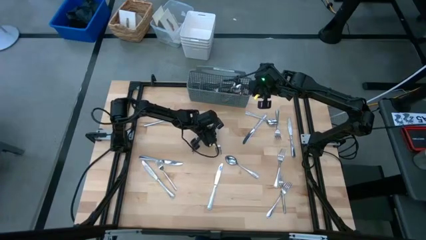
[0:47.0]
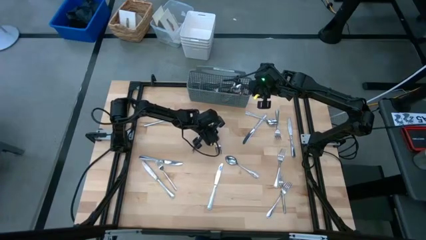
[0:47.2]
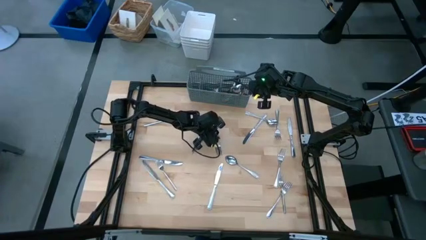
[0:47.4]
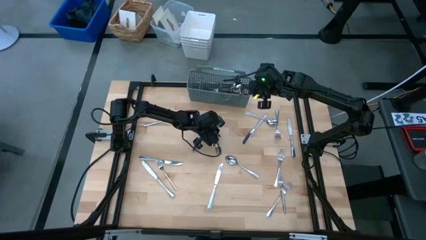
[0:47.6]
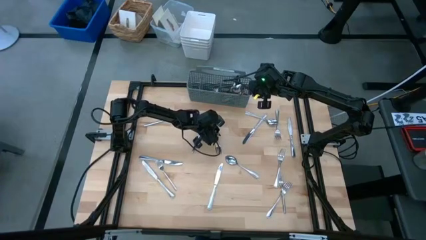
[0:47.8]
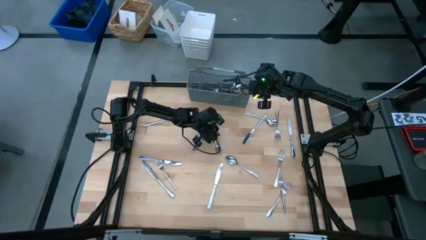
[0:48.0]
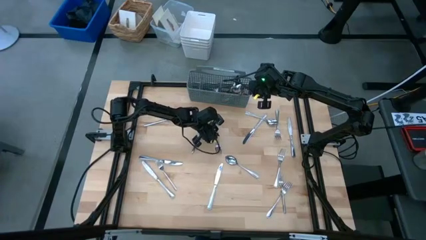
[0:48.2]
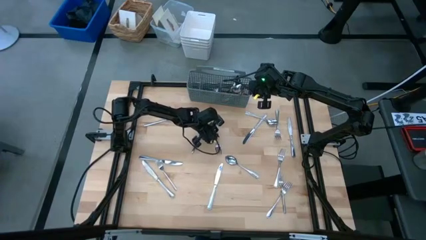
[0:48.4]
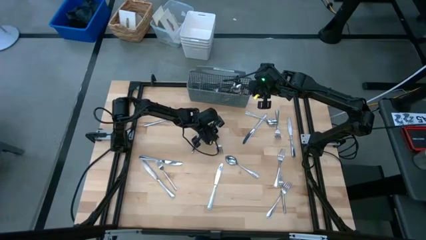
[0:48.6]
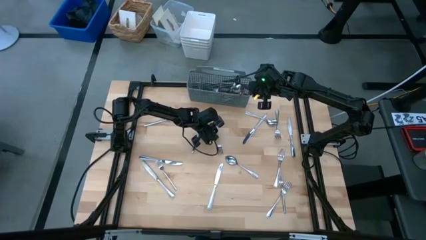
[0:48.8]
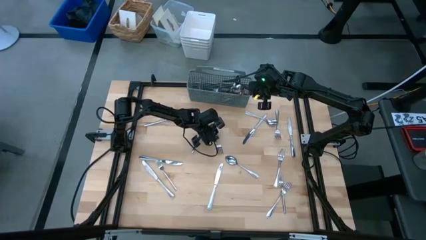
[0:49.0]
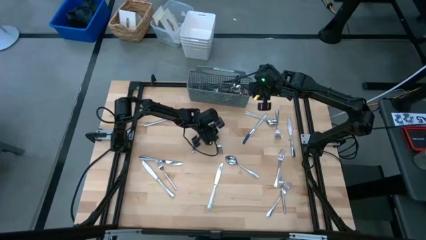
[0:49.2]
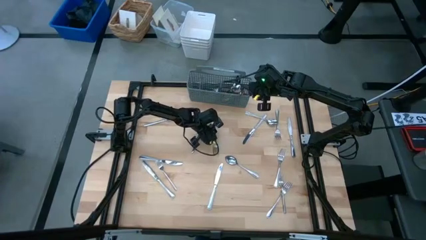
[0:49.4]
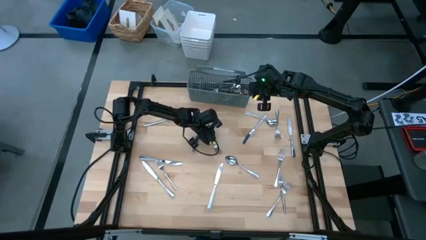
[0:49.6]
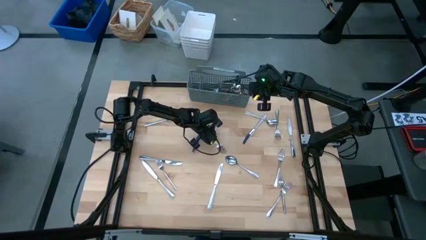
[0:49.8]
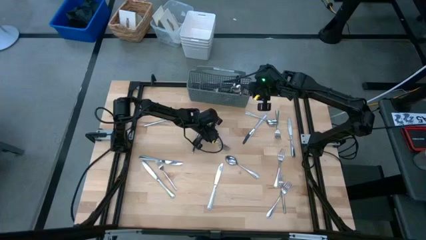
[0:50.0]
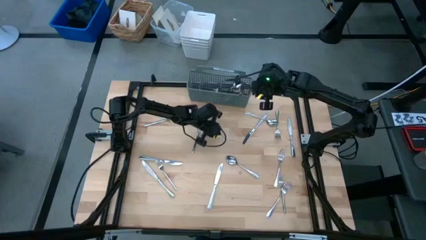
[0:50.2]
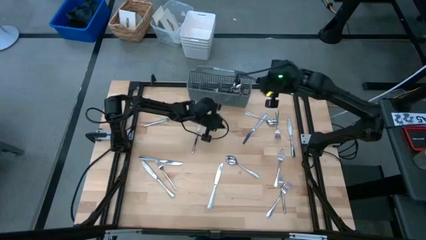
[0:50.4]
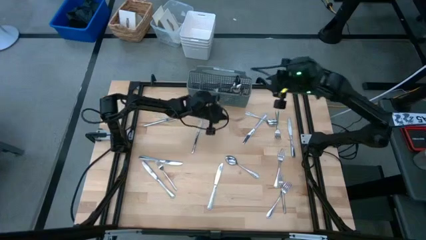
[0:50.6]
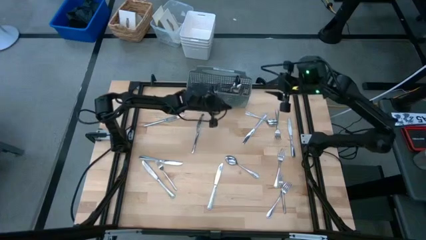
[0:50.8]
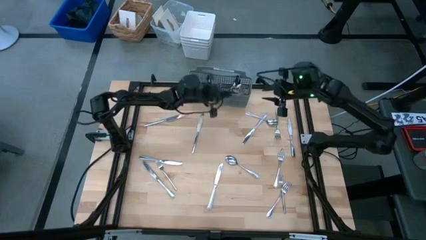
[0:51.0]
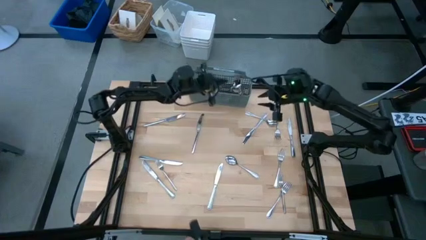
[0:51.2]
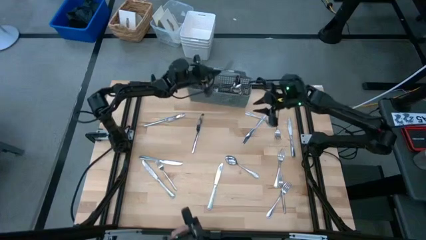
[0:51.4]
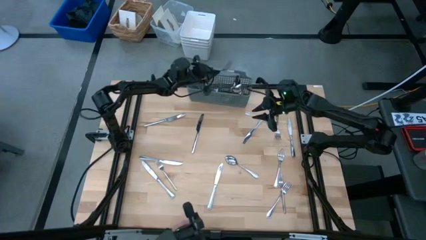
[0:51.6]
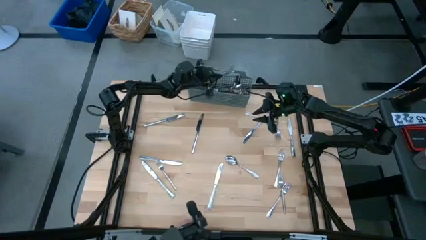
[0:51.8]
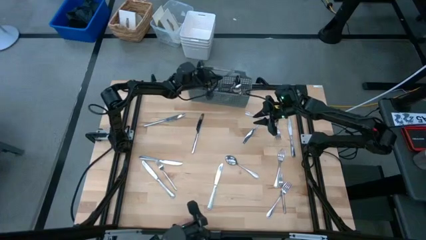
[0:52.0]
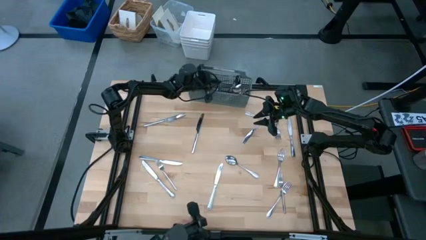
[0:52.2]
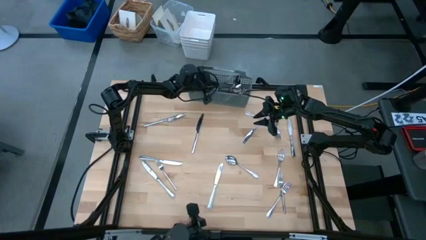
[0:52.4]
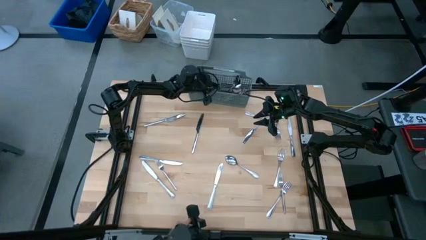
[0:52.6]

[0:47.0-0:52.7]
Task: Sort silverware
Put the fork into the gray silverware organizer

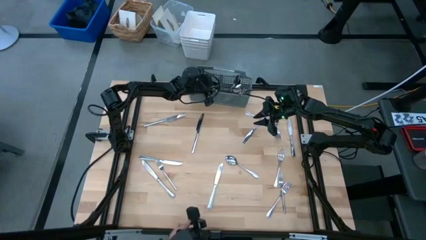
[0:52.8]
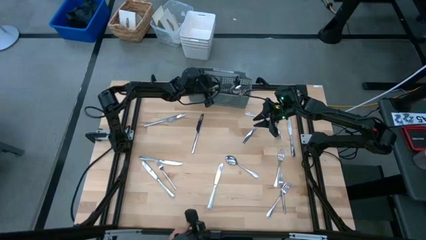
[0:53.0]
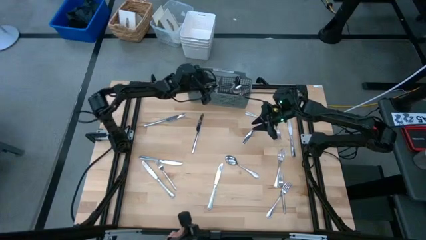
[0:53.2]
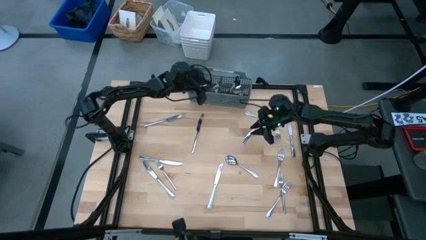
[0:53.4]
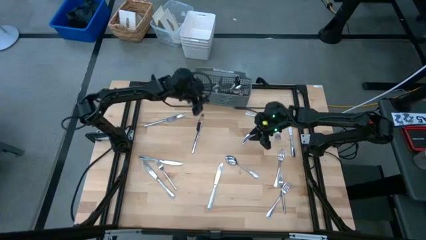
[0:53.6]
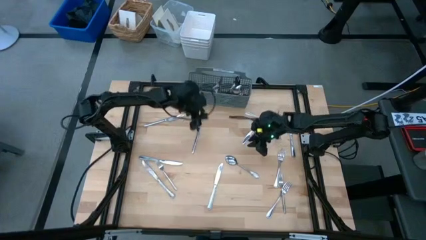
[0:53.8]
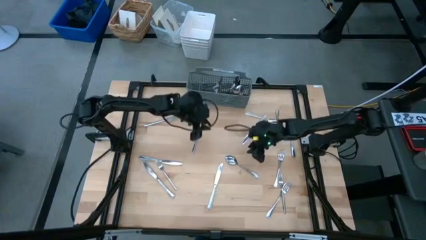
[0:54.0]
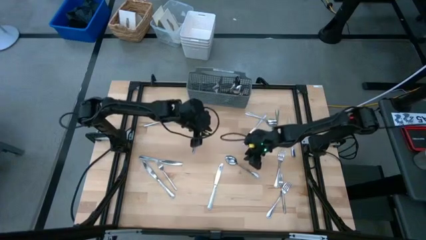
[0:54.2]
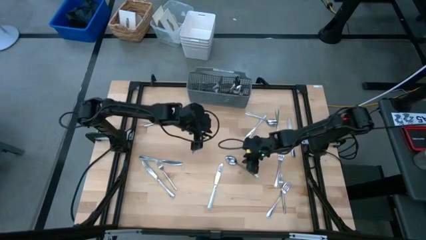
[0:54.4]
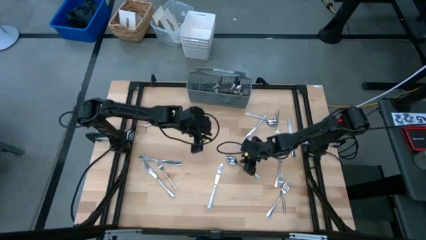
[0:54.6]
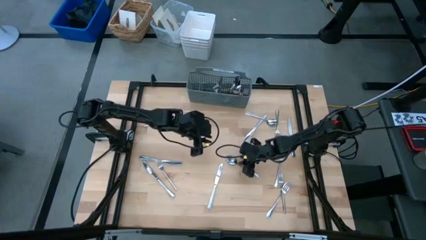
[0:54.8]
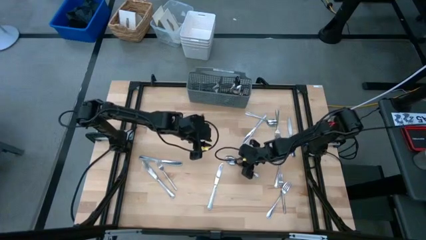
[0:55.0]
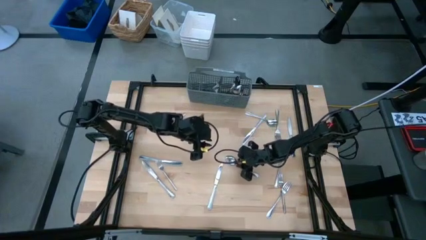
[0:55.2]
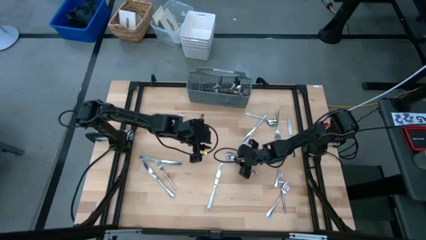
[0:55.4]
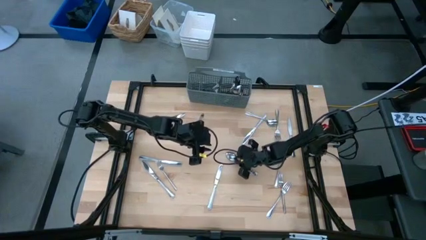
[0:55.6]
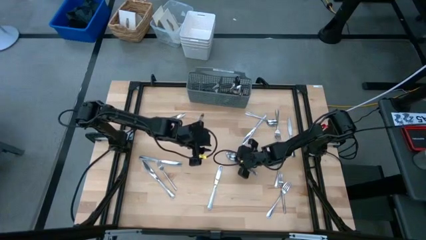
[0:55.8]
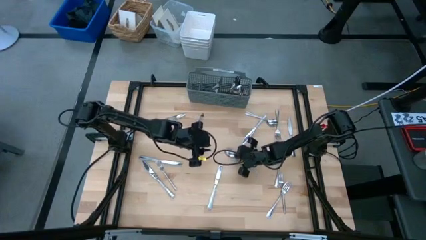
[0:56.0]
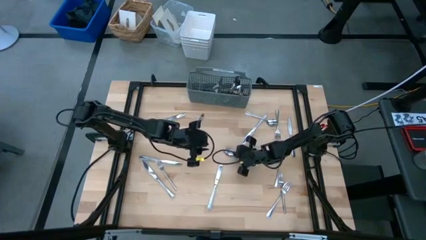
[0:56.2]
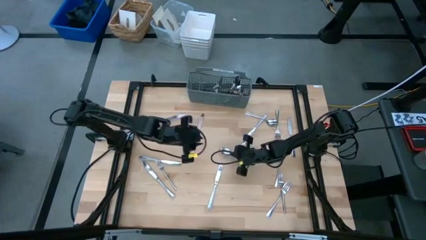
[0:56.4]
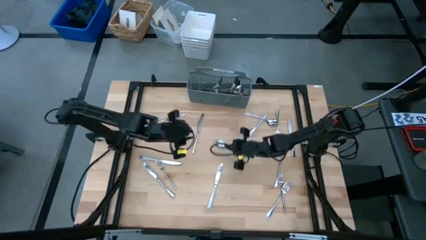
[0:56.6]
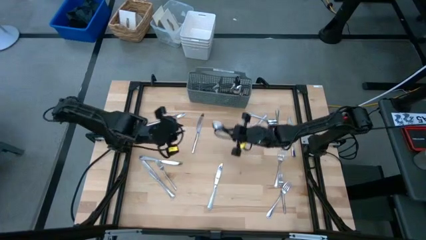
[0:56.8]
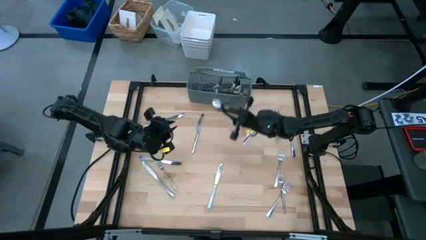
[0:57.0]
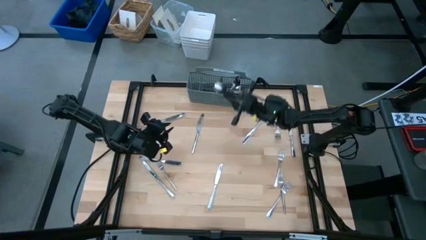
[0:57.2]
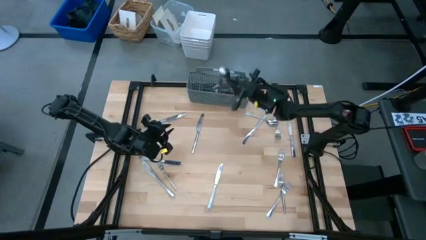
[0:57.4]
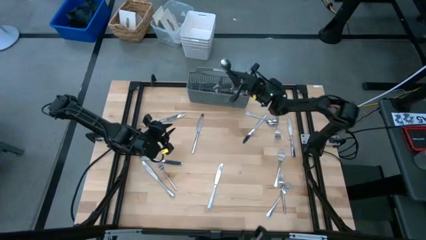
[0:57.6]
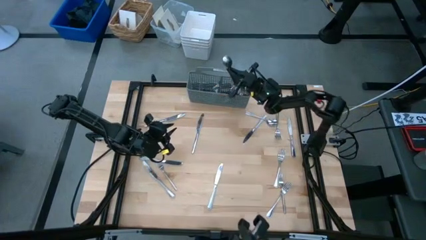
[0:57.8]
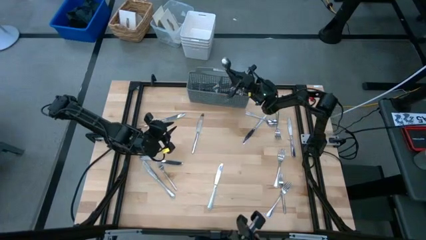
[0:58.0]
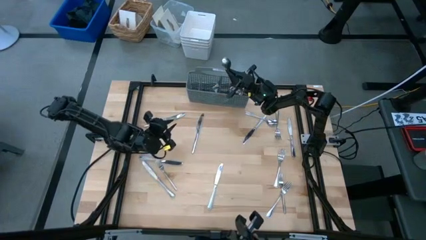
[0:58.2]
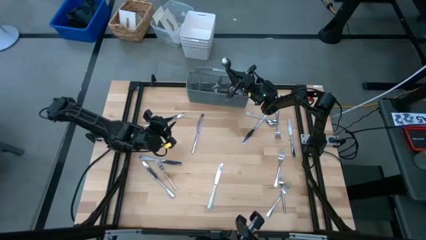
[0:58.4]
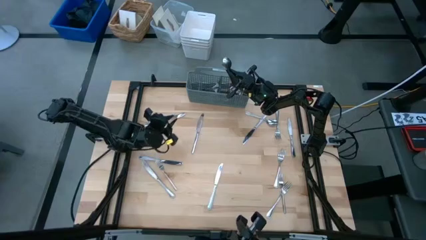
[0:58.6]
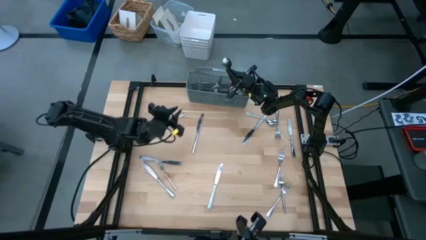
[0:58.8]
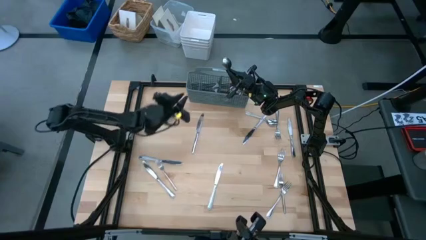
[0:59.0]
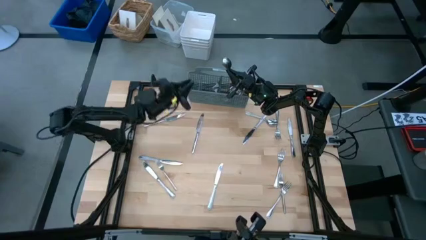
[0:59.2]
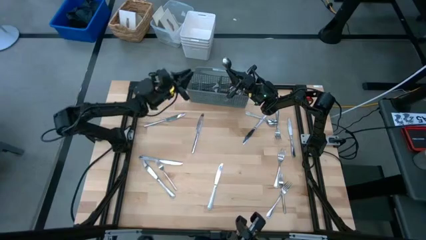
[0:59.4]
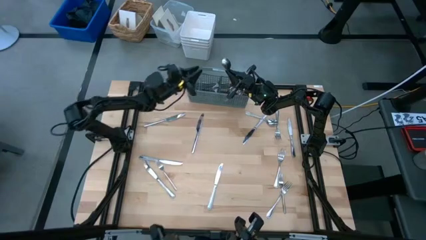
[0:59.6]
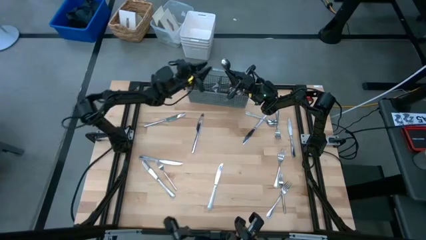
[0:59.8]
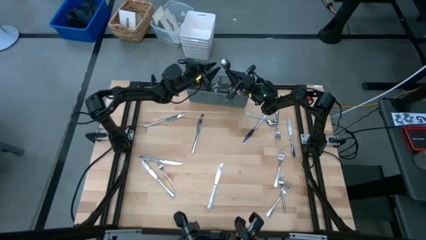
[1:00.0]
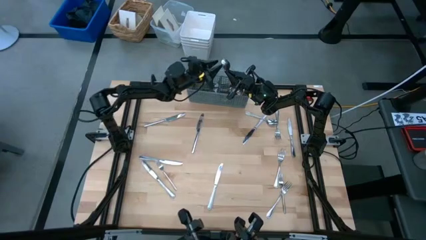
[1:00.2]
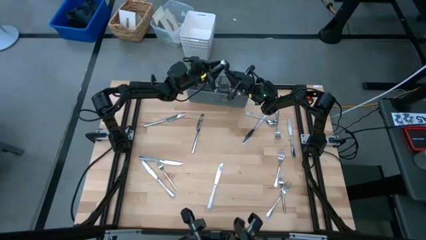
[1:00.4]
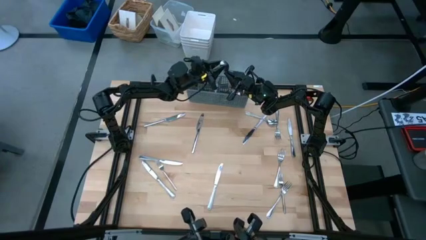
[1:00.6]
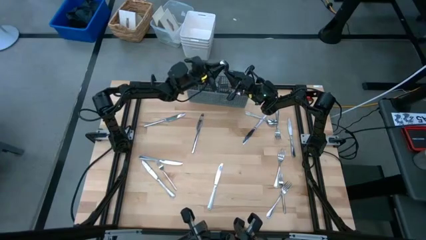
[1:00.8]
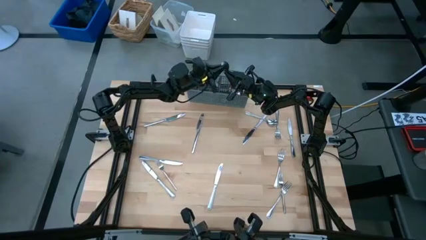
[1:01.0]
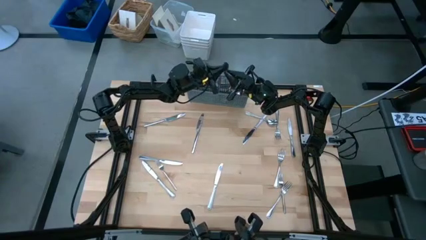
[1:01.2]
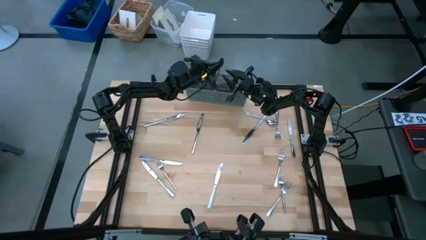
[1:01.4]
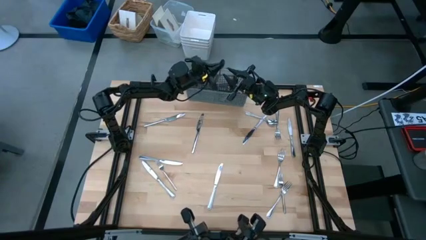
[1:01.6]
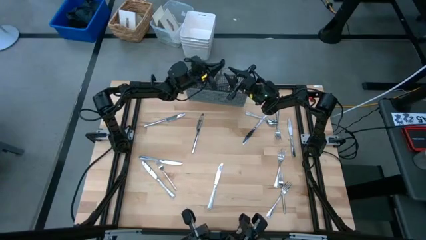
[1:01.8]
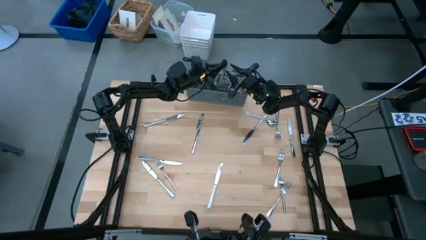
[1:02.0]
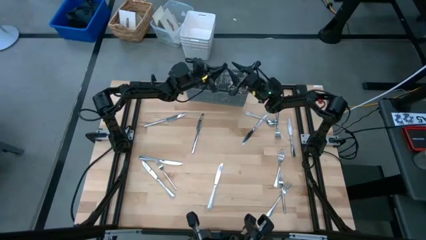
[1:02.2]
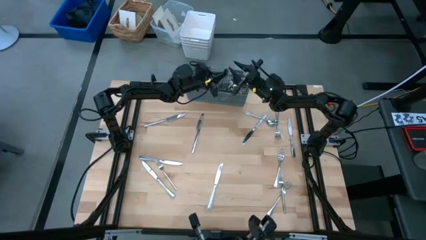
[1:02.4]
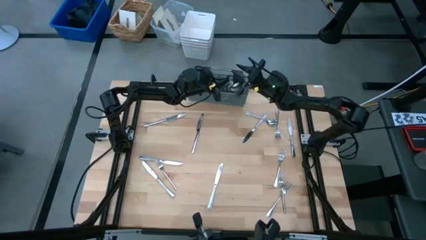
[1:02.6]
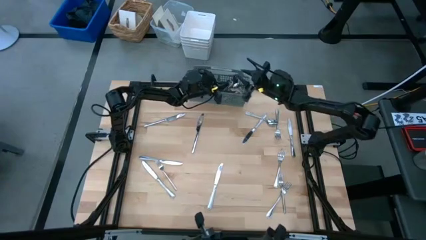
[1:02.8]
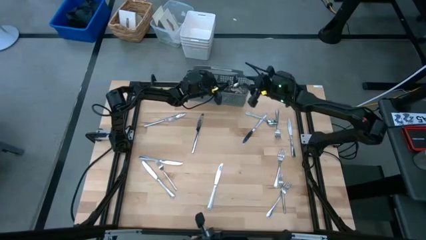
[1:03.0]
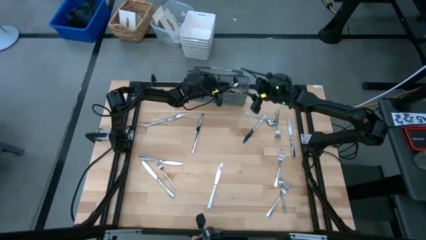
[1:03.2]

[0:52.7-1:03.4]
Put the spoon into the gray silverware organizer
